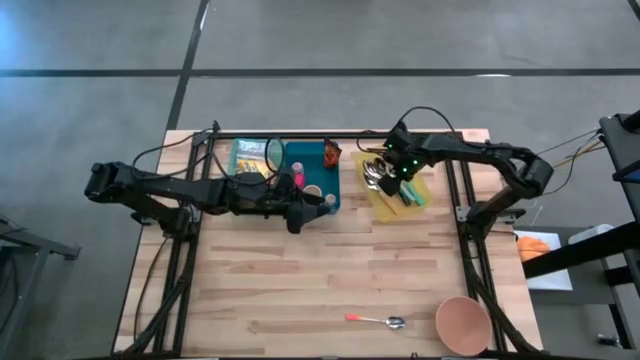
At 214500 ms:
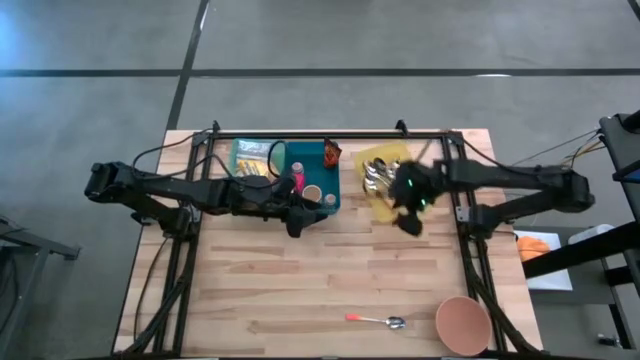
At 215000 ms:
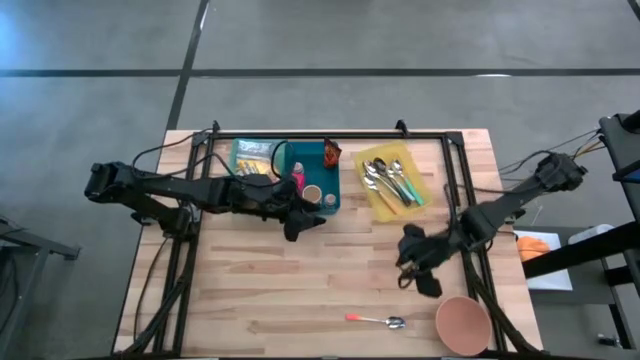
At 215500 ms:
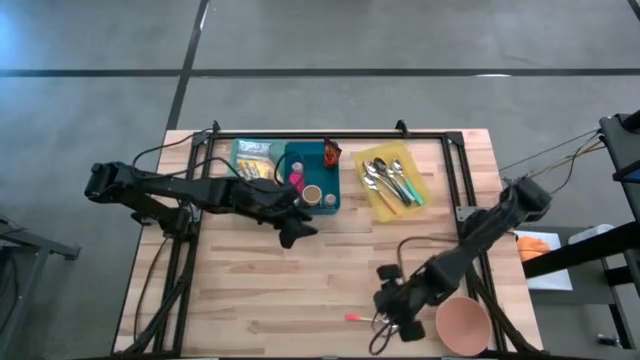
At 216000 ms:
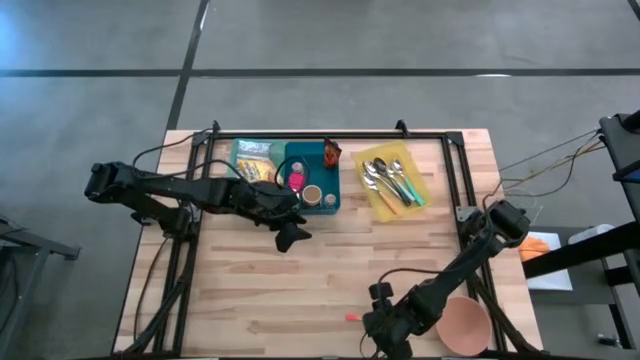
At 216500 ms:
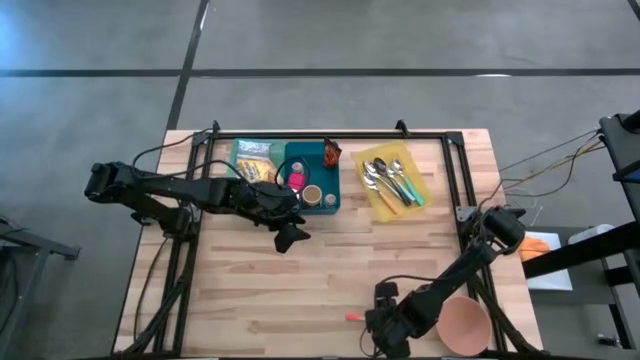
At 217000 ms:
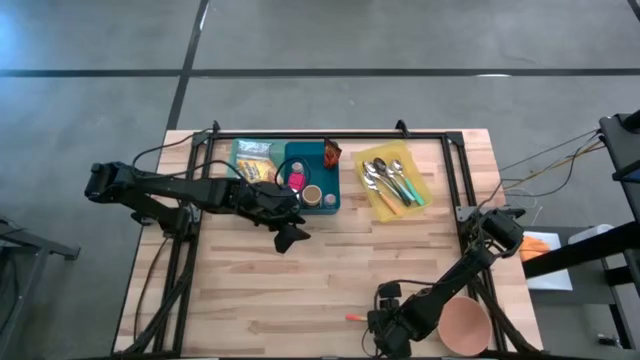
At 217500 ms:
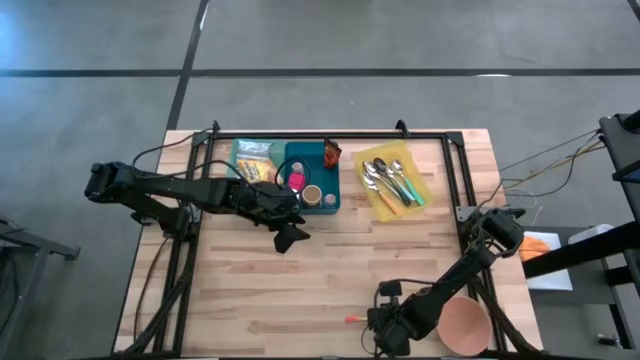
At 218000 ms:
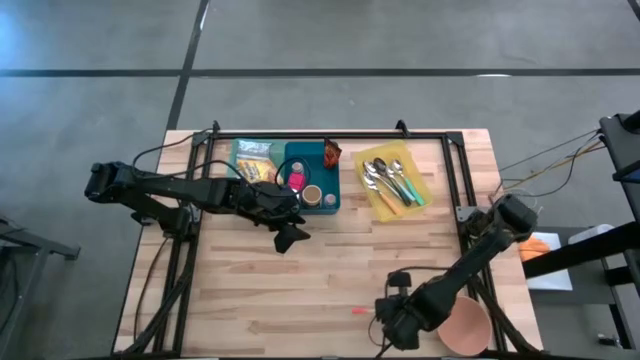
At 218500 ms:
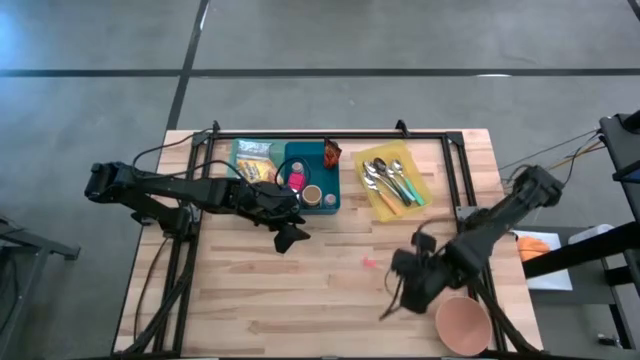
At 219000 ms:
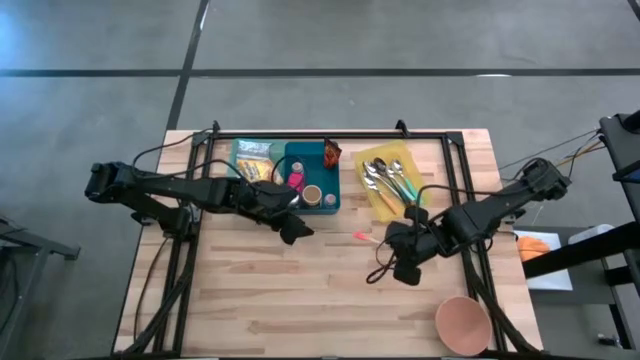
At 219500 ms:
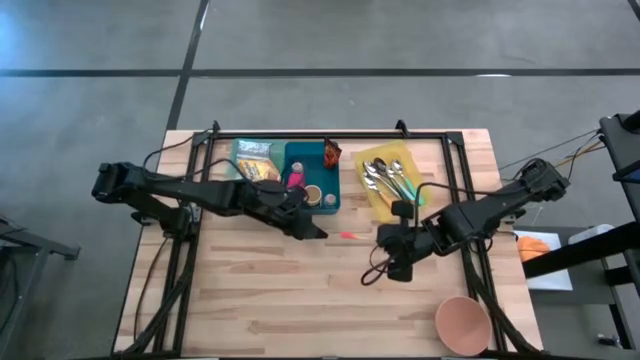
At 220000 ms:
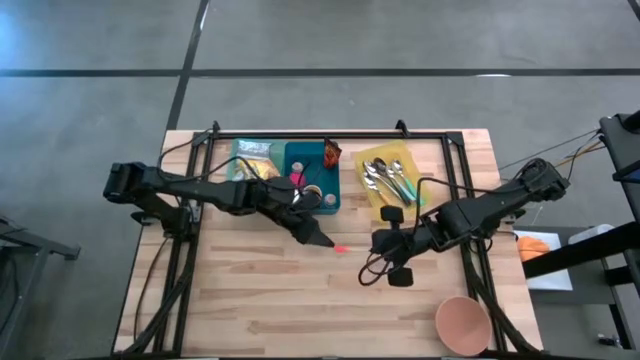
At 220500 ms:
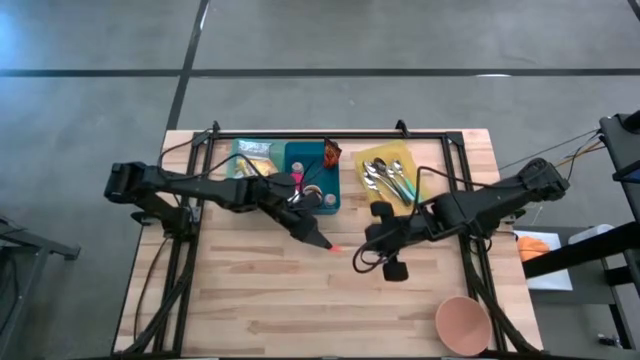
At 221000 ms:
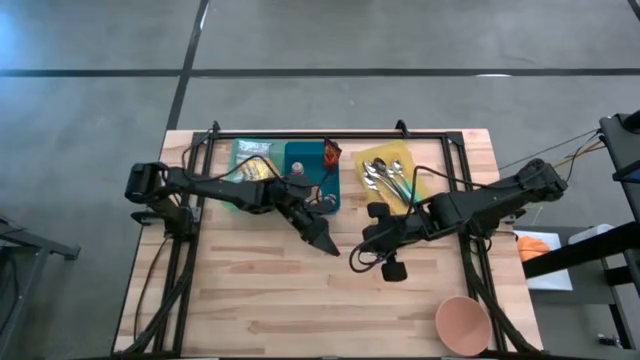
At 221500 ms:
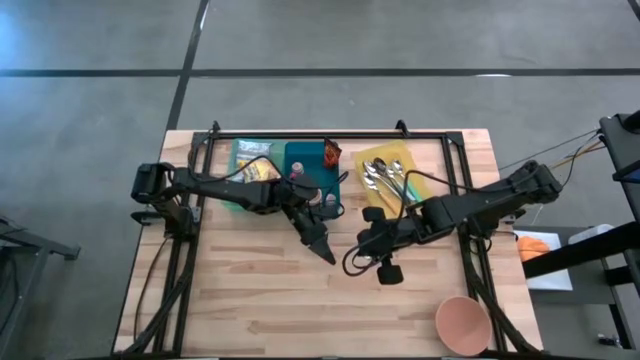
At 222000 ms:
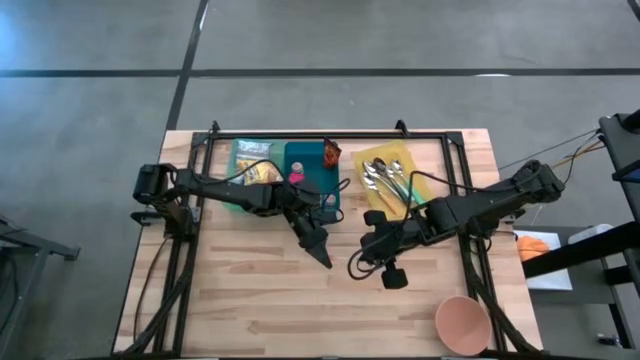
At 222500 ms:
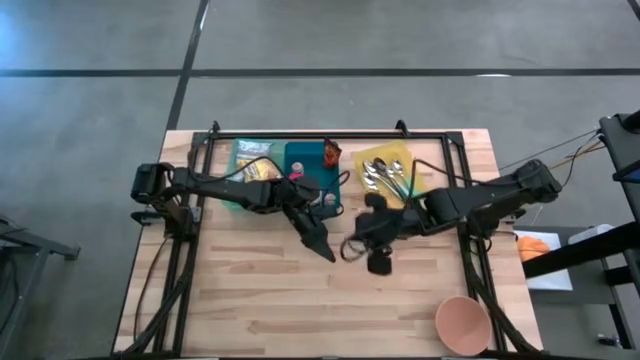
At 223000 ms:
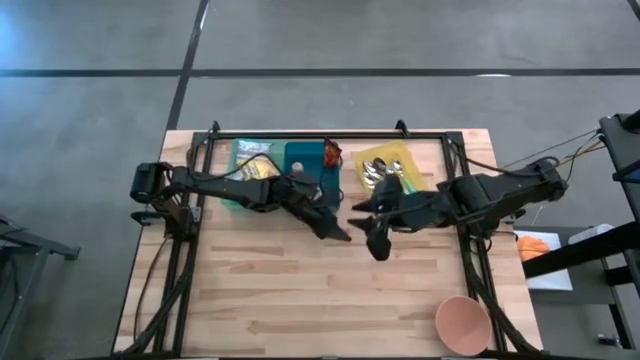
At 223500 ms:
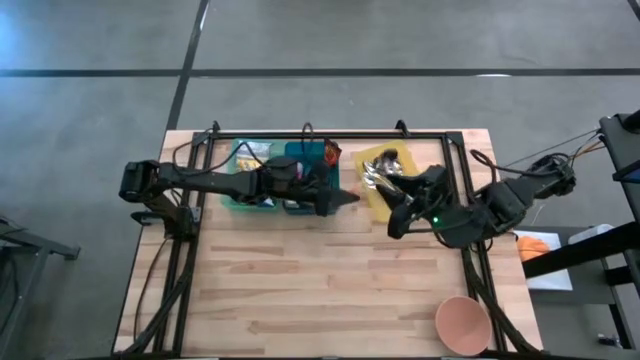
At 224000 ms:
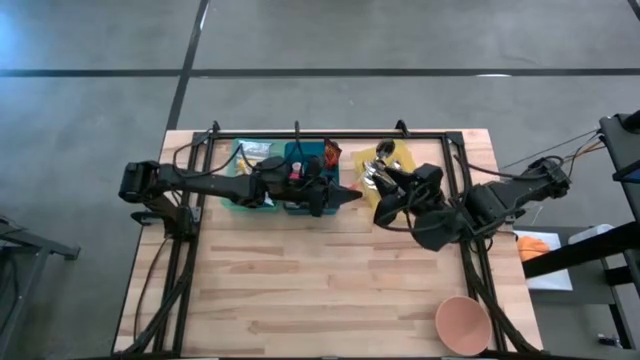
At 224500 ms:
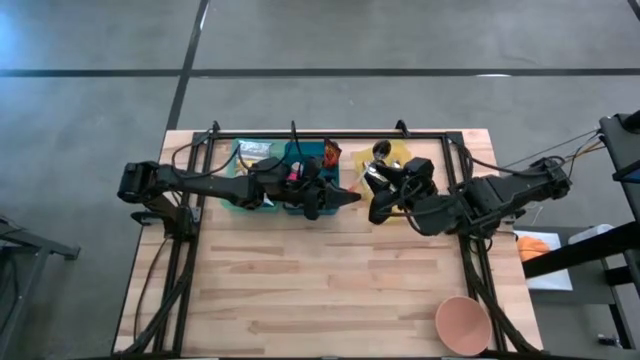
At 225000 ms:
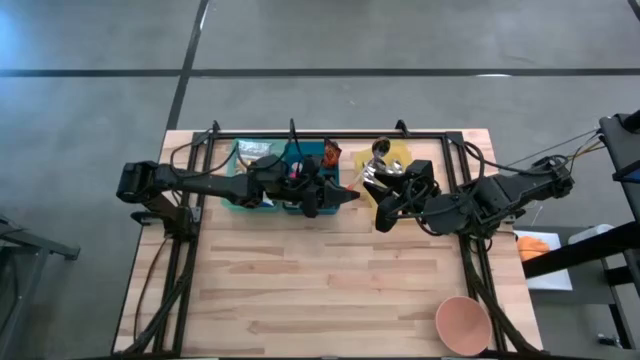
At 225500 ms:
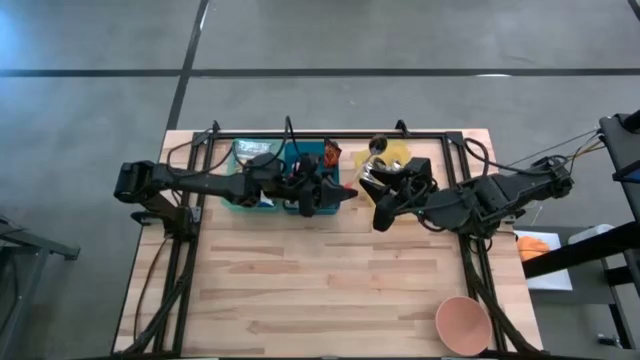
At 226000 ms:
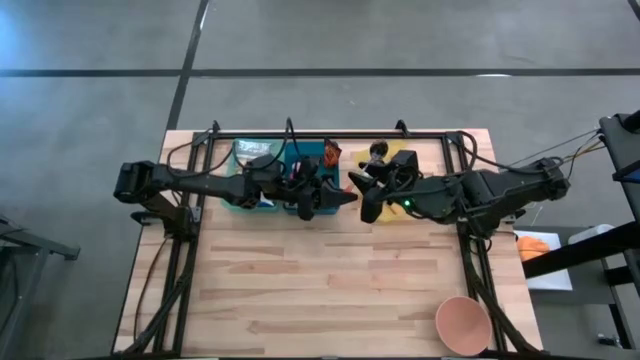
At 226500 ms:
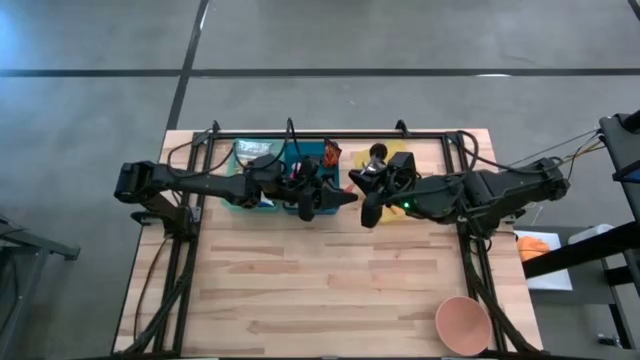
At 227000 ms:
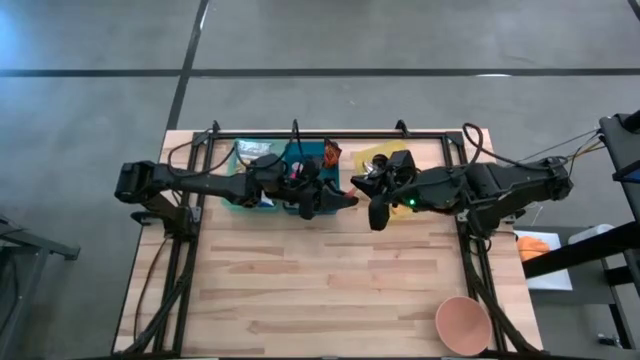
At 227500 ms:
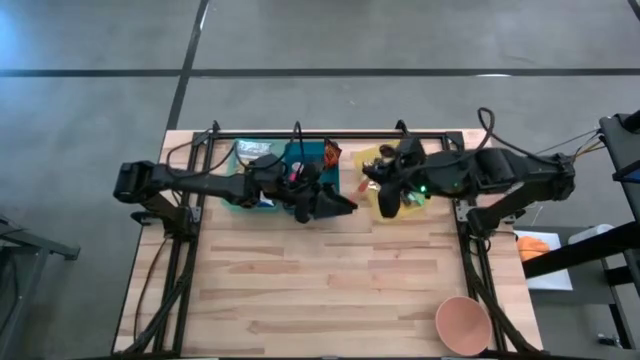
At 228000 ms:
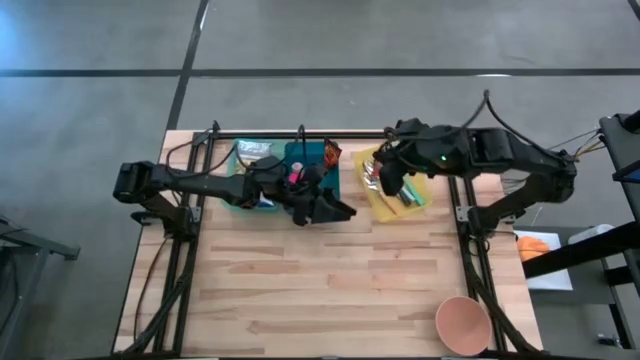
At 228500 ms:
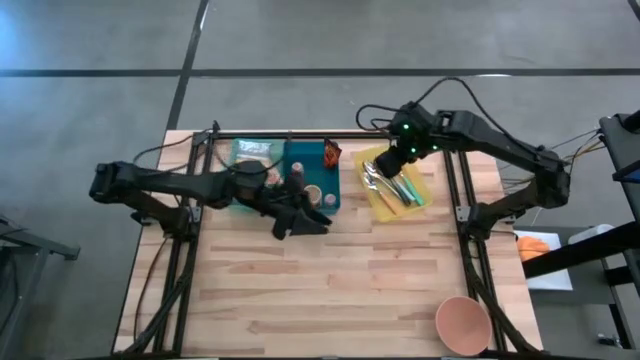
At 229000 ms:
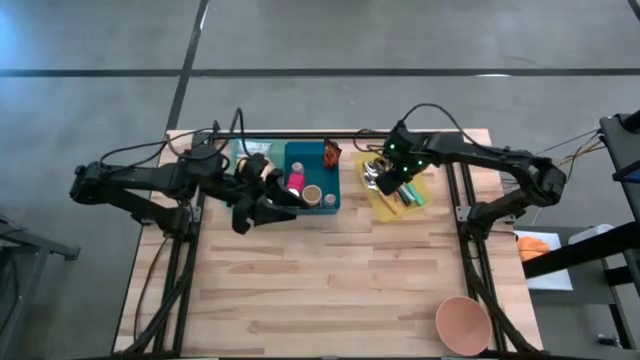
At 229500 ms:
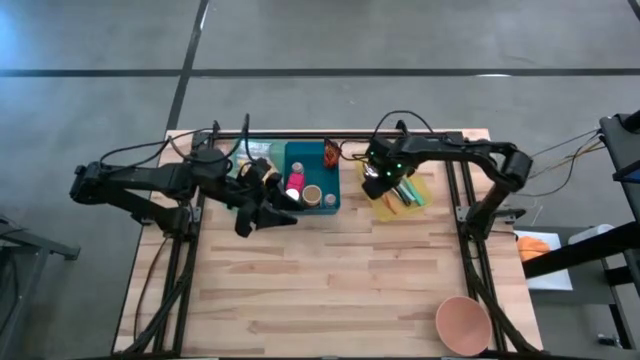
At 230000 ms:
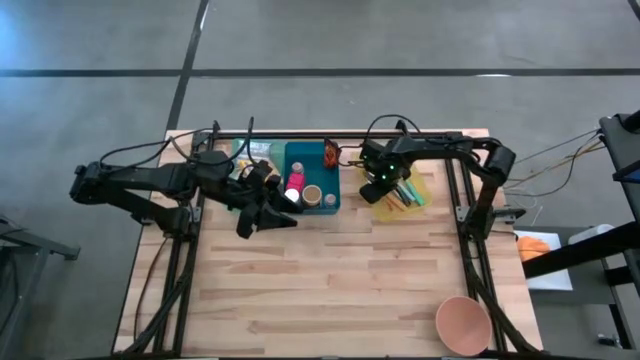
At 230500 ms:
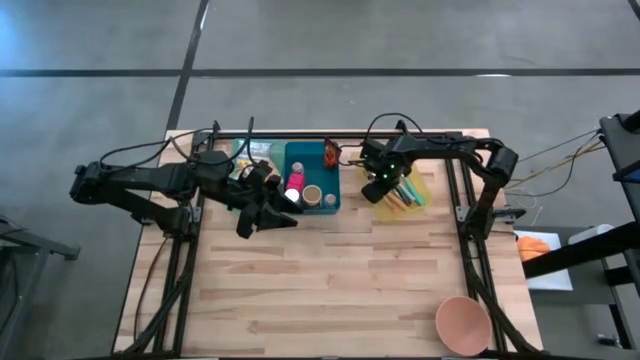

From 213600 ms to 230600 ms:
Put the orange spoon into the yellow bin
